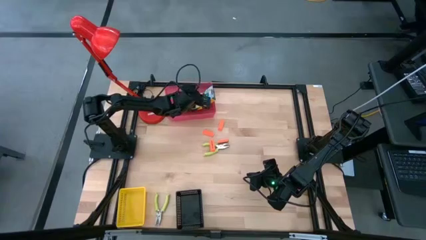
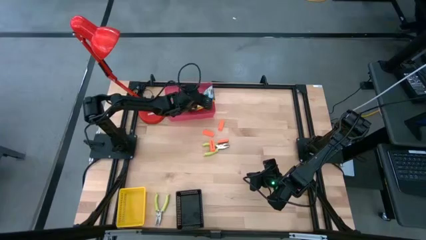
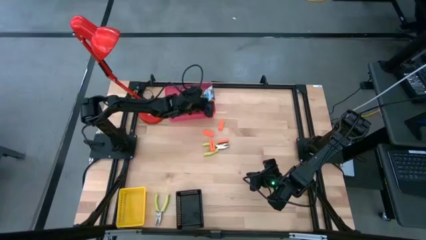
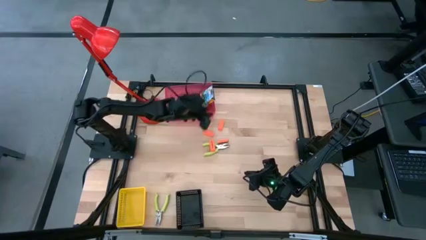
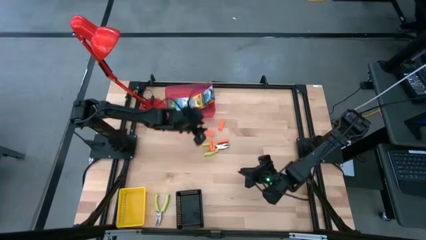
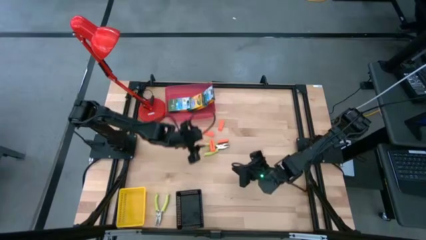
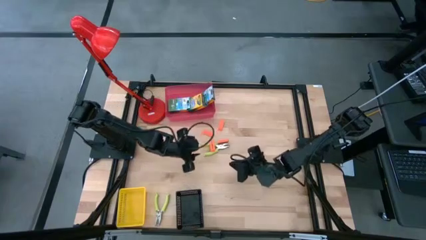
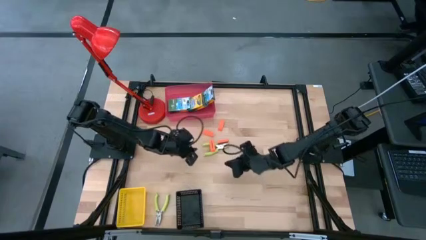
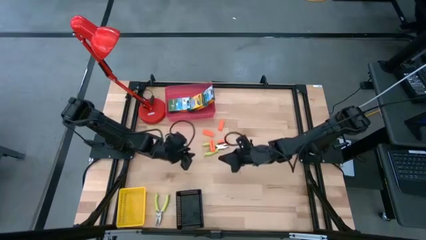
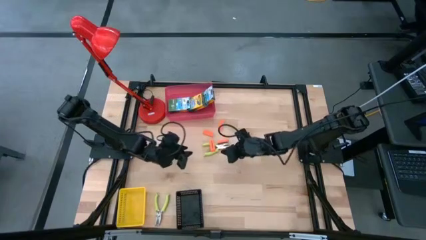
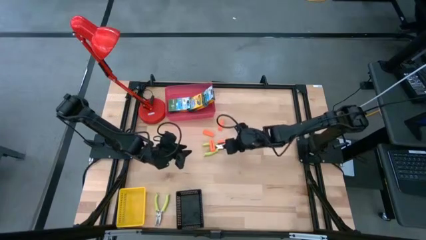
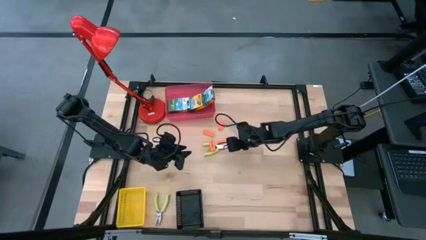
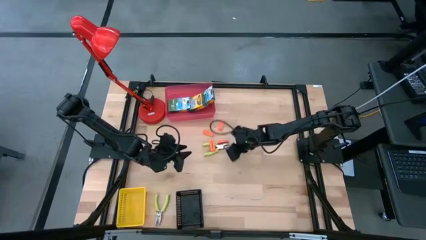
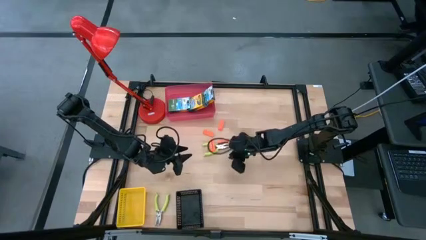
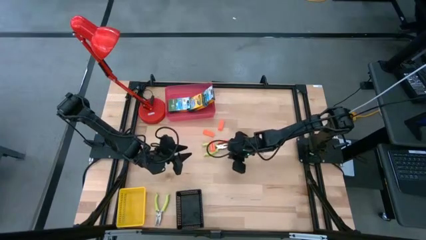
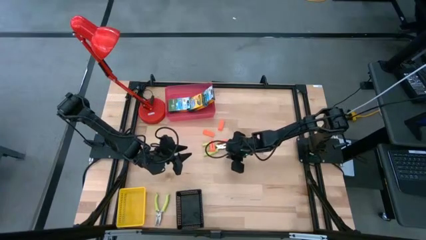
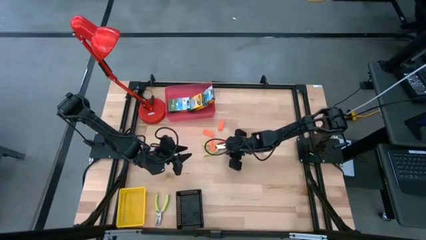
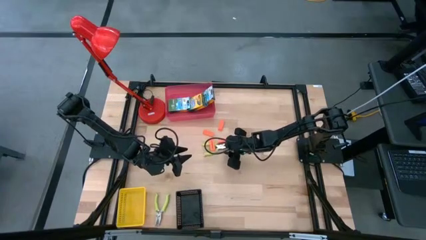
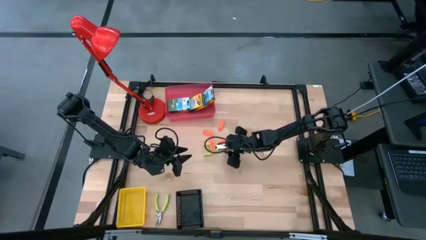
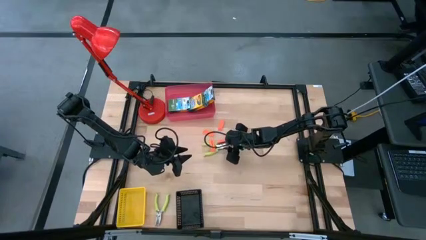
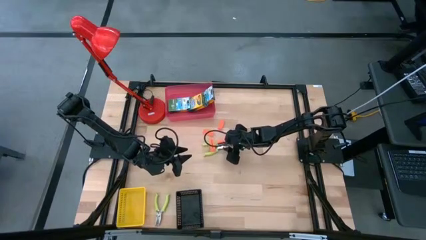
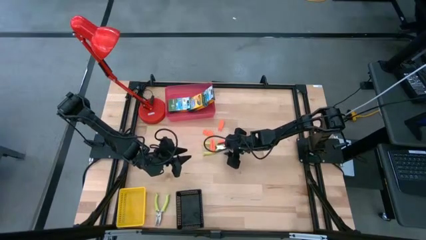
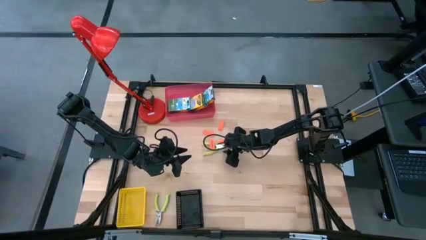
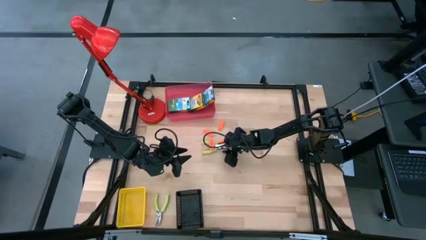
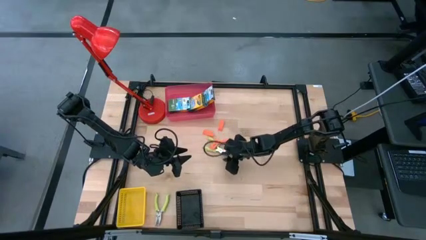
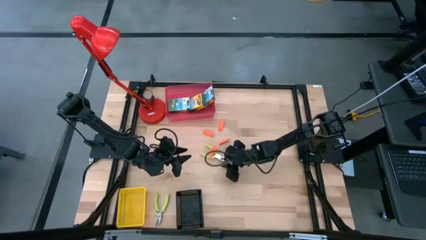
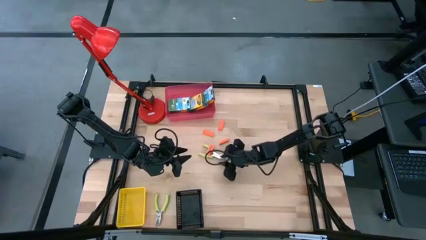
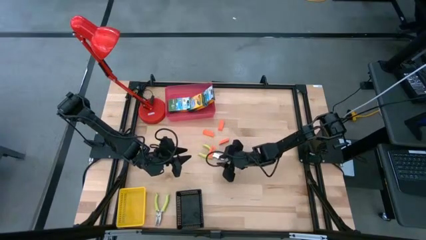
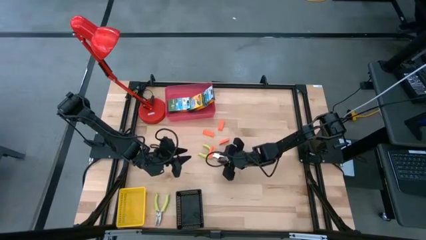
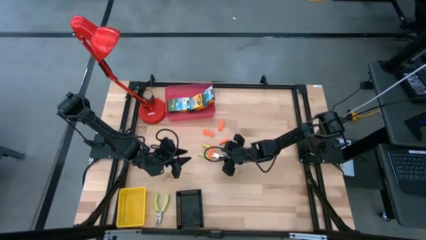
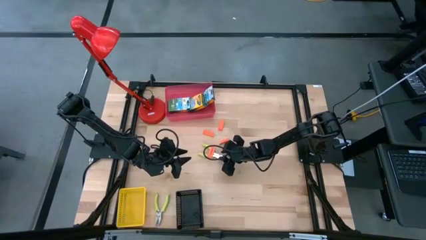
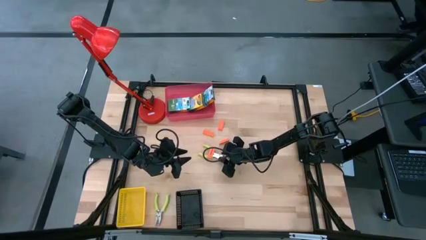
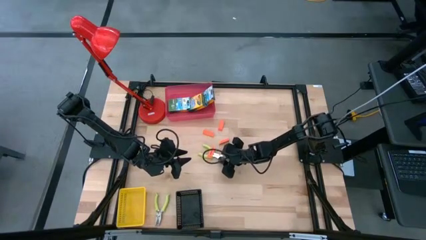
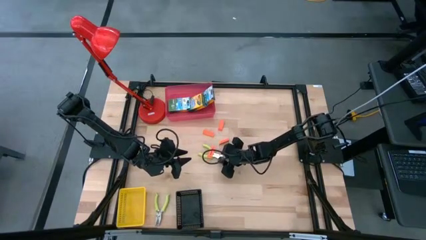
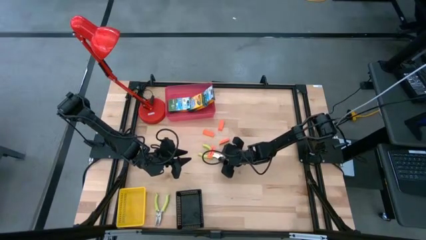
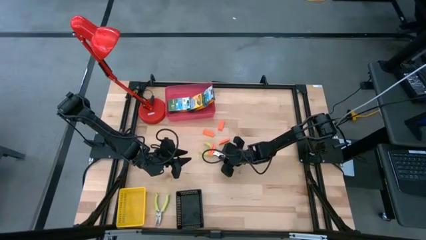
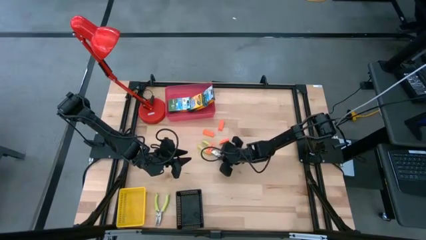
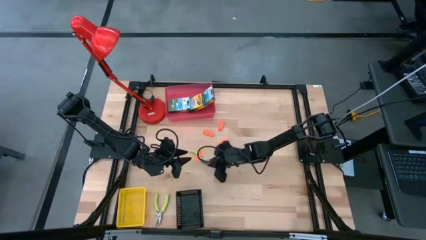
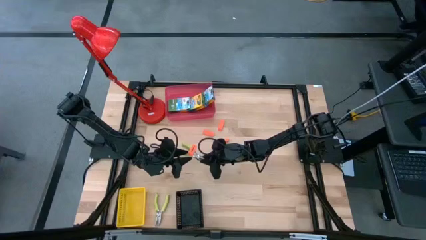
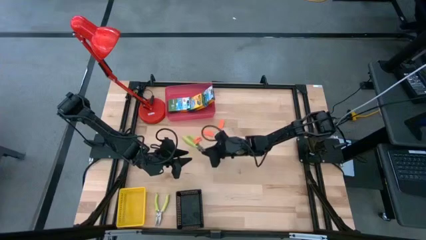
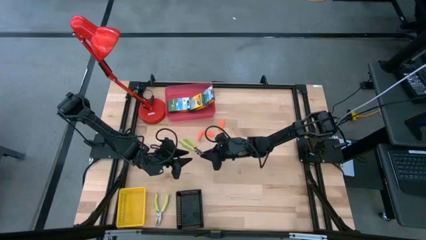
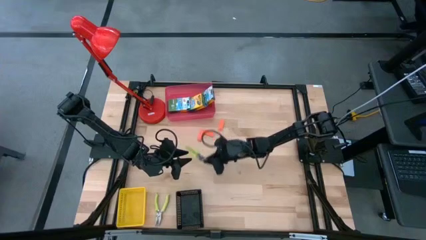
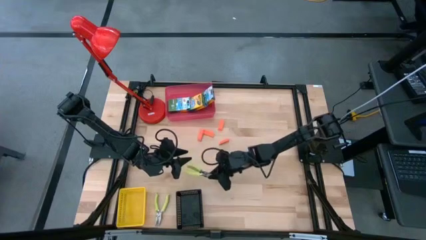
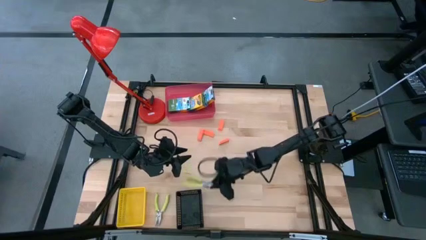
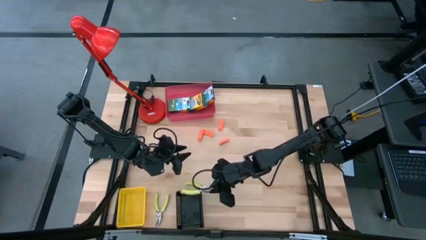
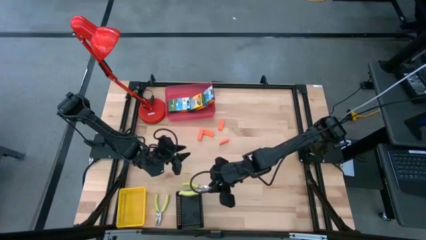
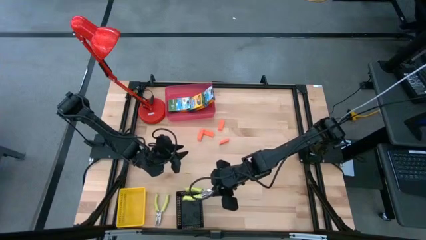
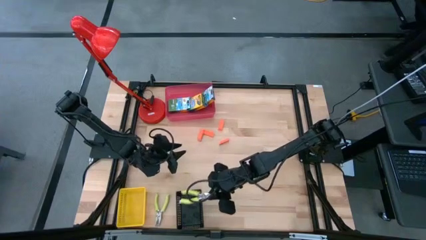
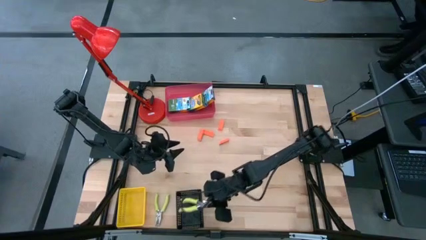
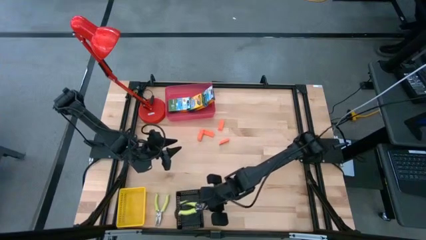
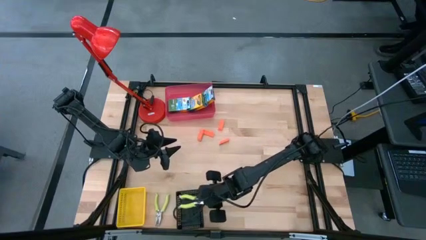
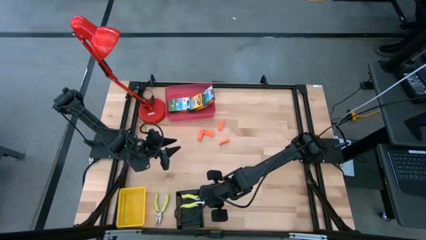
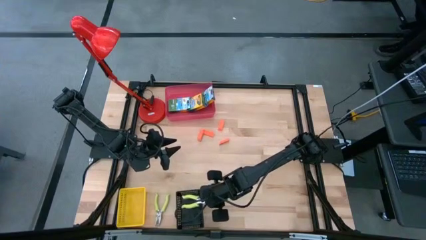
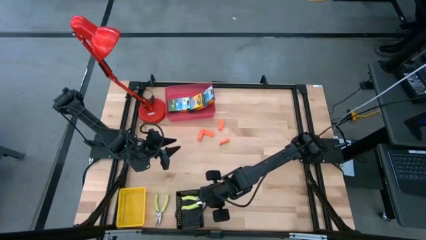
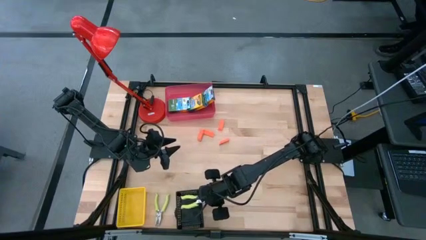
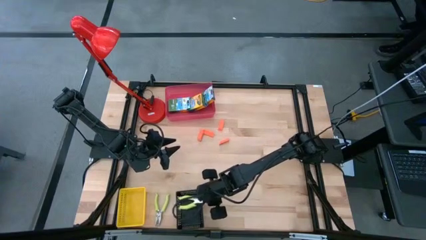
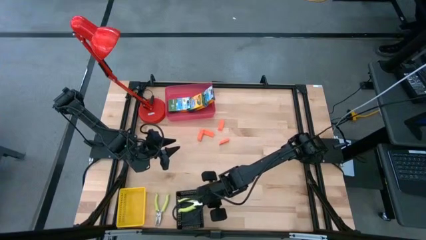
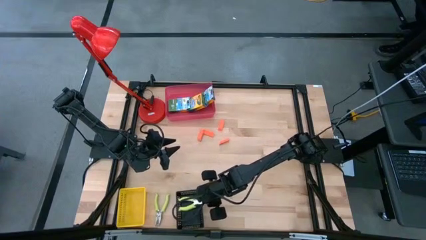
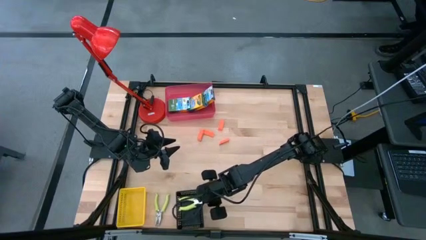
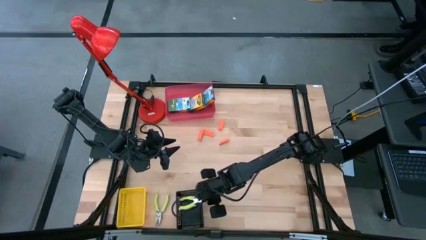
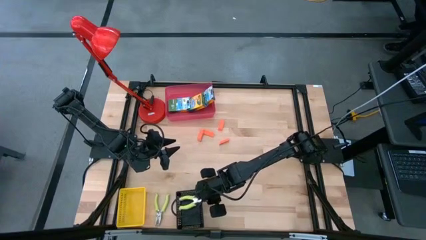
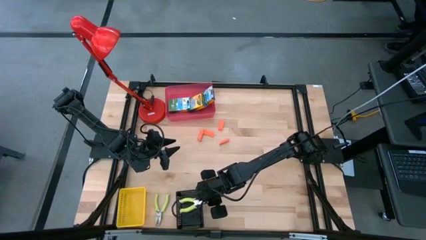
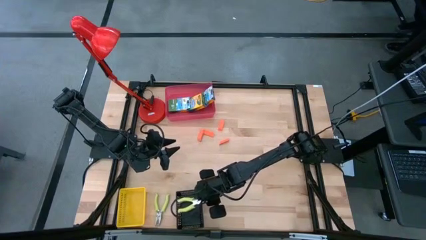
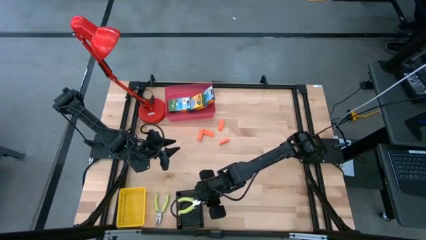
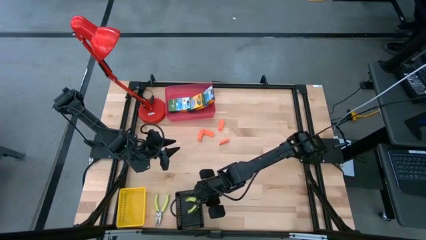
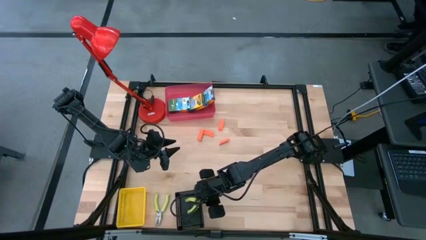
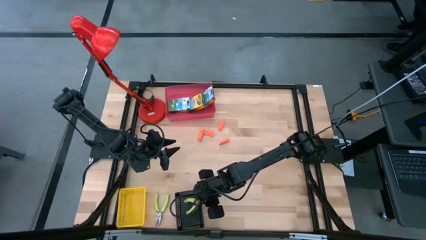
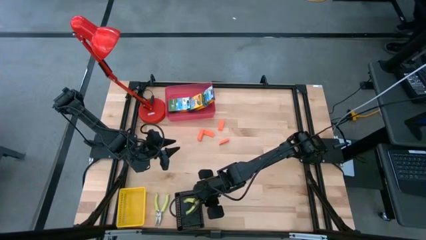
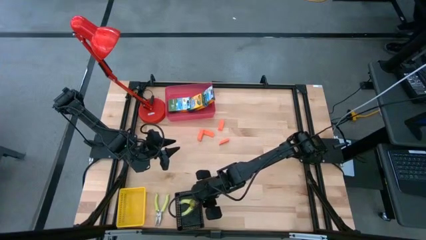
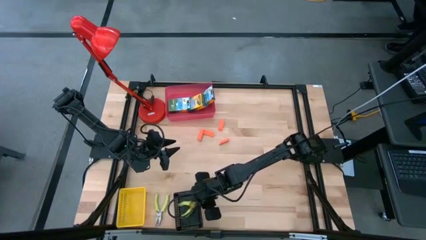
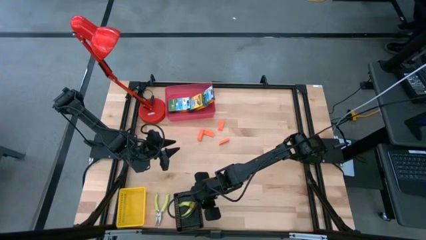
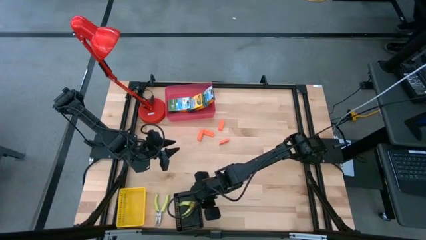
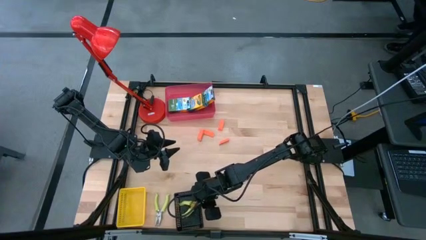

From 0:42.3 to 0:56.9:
Task: Pick & Place School Supplies
Put the green hole puncher into the black bin

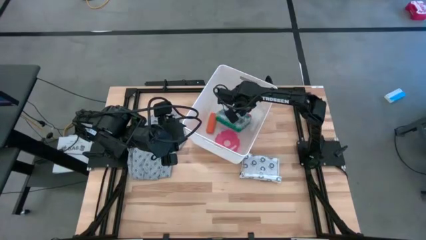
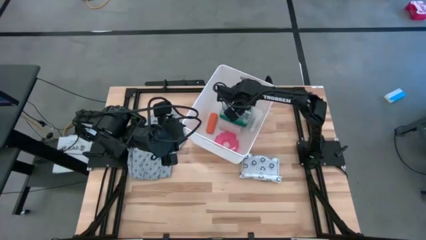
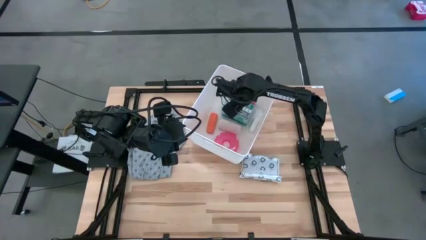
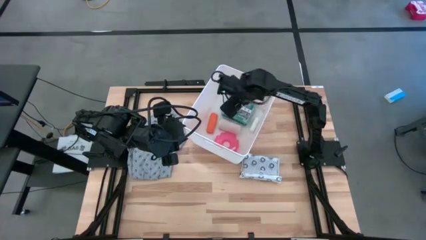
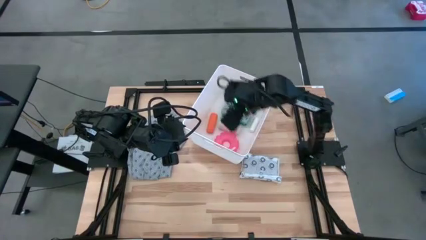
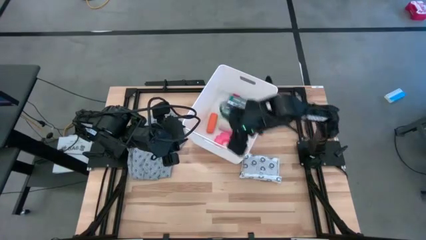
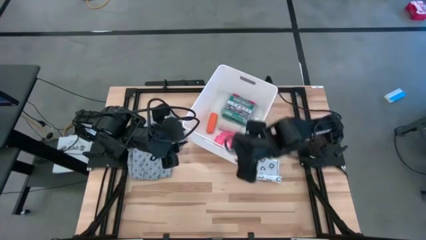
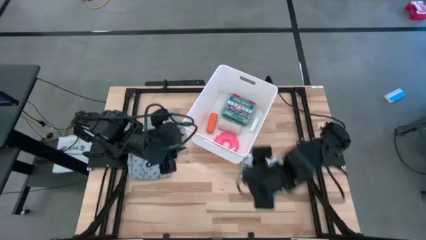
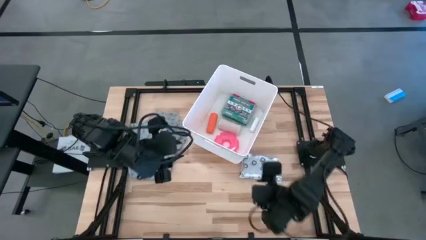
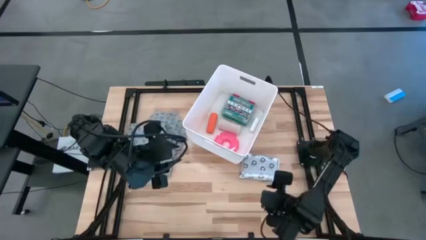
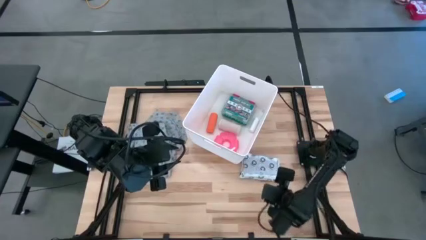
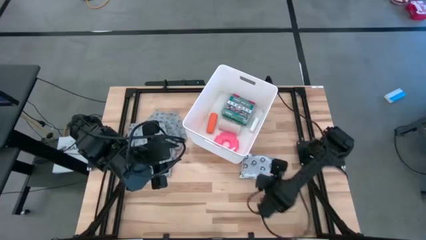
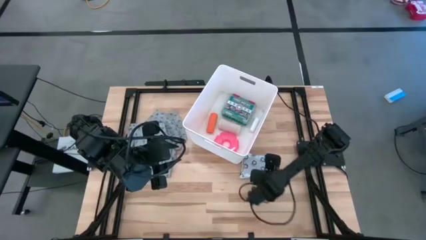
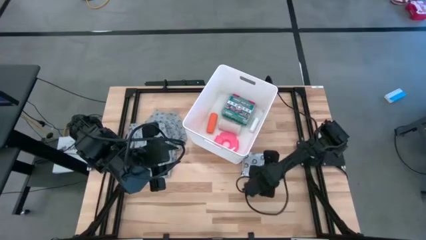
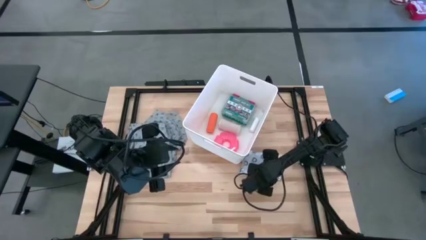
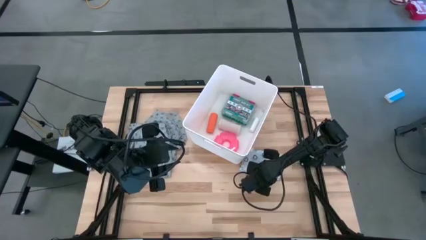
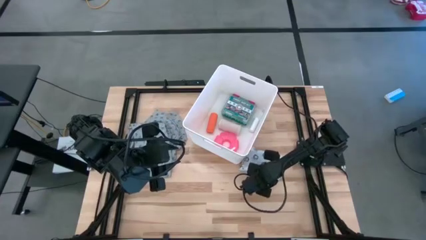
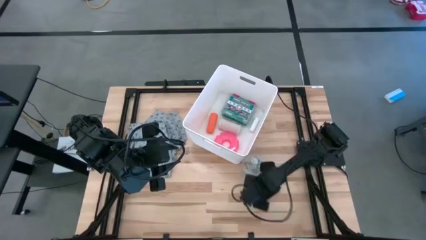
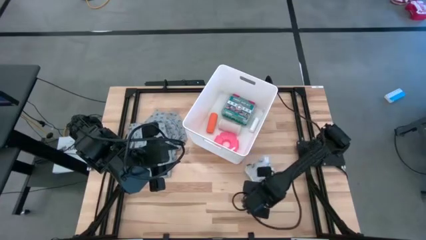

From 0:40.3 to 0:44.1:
Task: Pick & place medical supplies in basket/bin
Put the white mailer bag into the white bin
